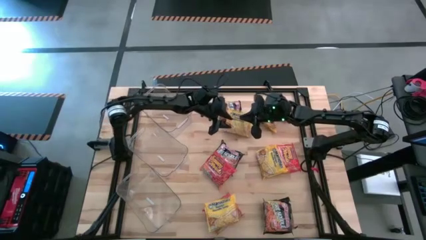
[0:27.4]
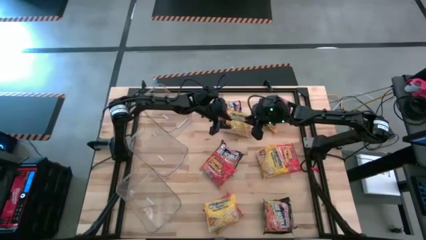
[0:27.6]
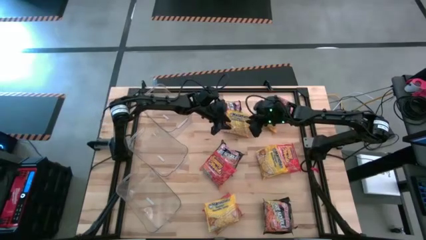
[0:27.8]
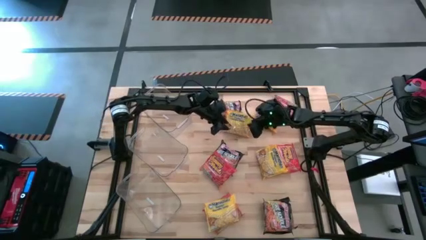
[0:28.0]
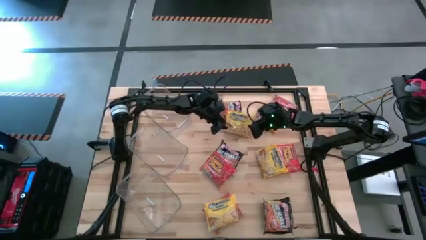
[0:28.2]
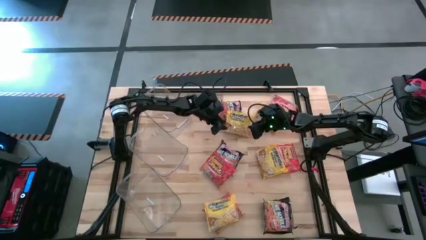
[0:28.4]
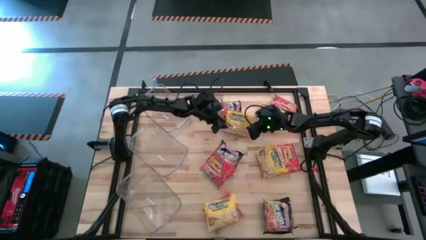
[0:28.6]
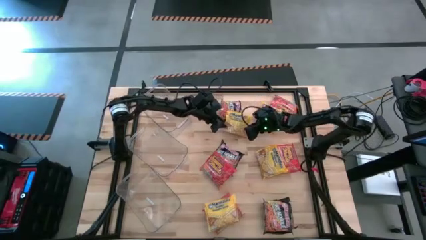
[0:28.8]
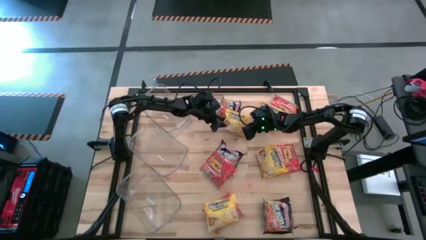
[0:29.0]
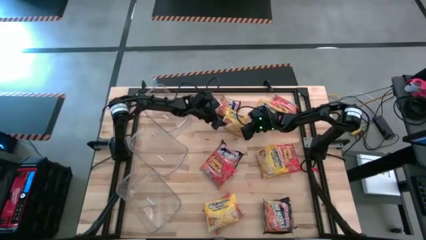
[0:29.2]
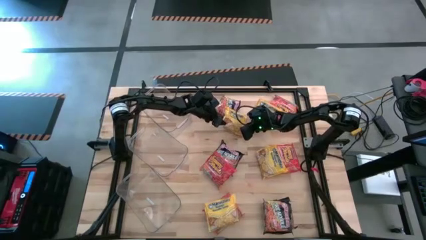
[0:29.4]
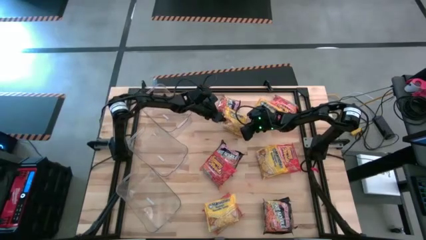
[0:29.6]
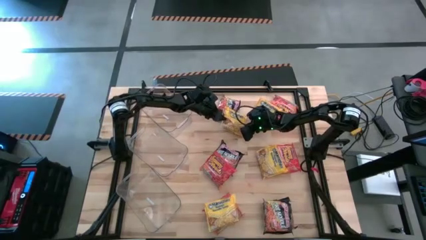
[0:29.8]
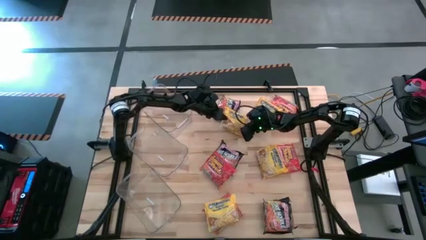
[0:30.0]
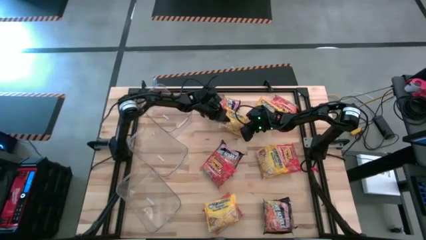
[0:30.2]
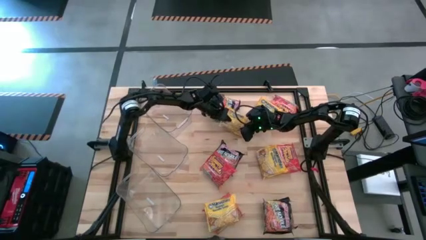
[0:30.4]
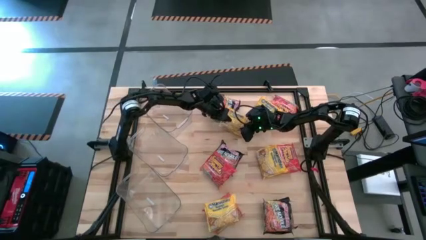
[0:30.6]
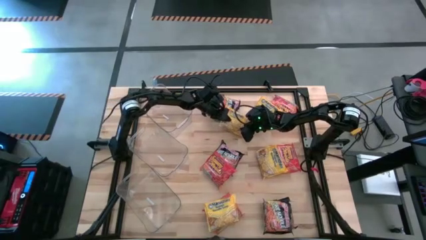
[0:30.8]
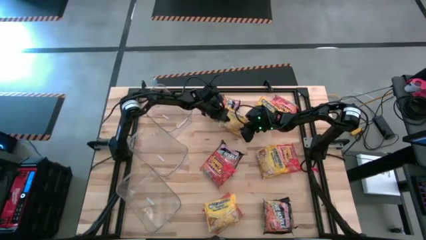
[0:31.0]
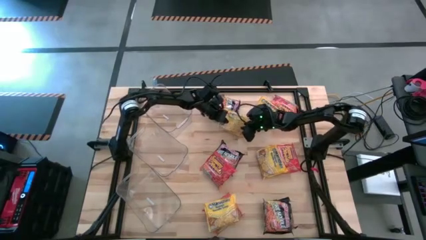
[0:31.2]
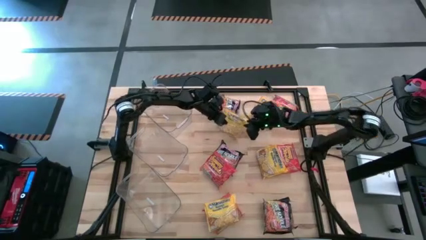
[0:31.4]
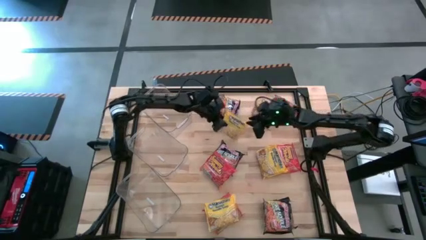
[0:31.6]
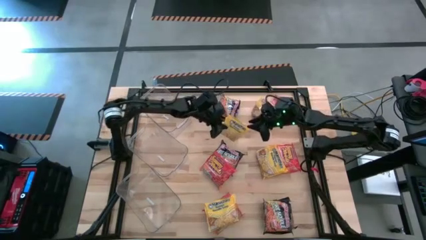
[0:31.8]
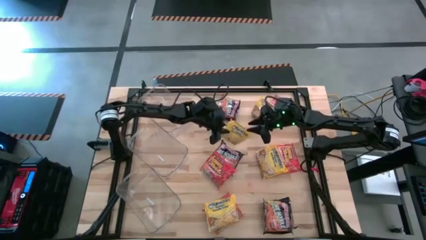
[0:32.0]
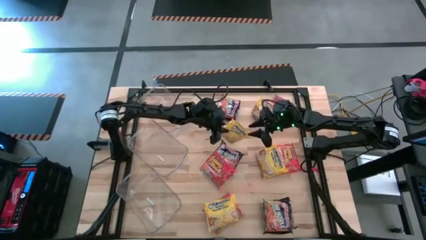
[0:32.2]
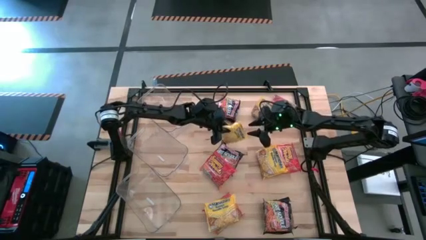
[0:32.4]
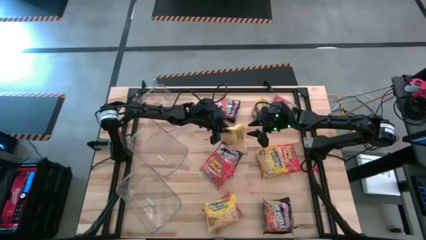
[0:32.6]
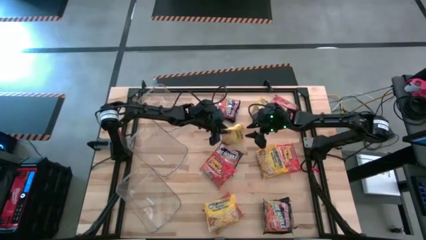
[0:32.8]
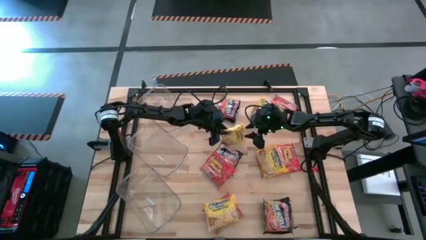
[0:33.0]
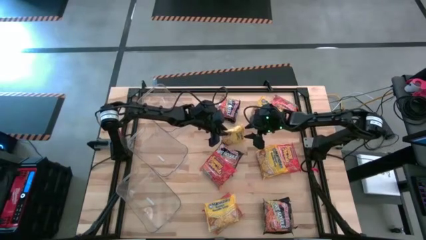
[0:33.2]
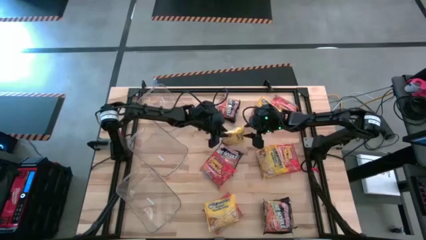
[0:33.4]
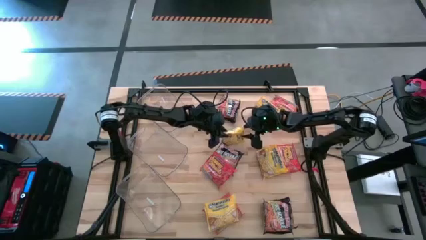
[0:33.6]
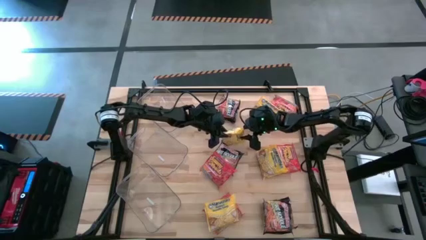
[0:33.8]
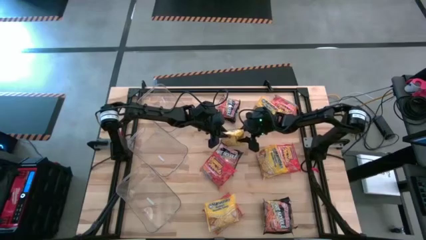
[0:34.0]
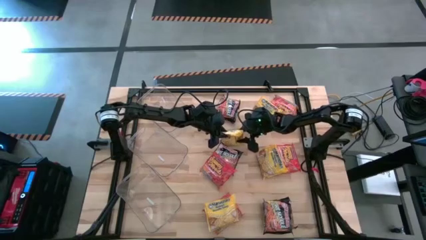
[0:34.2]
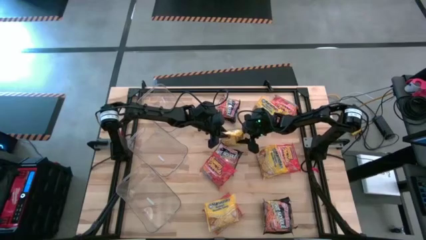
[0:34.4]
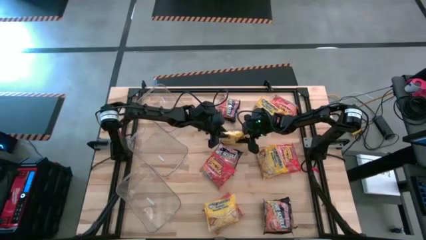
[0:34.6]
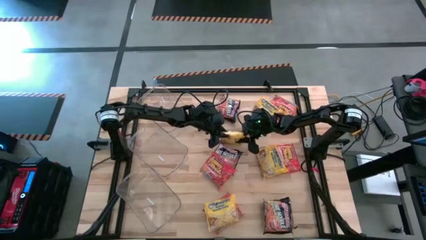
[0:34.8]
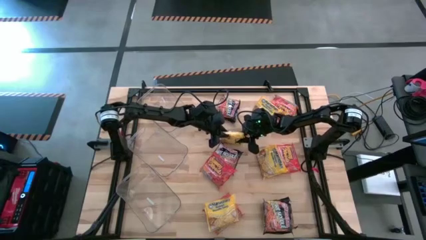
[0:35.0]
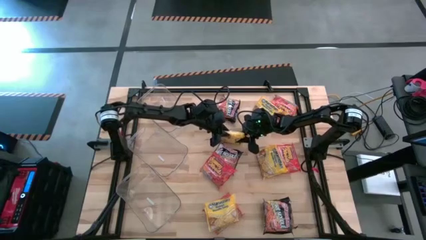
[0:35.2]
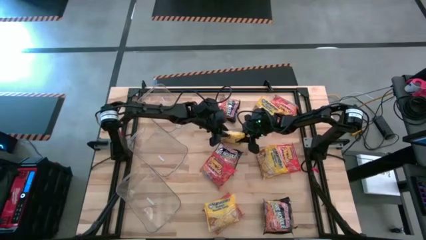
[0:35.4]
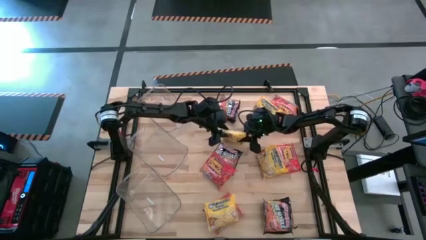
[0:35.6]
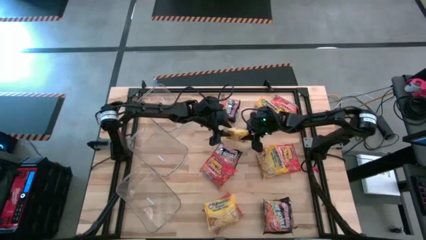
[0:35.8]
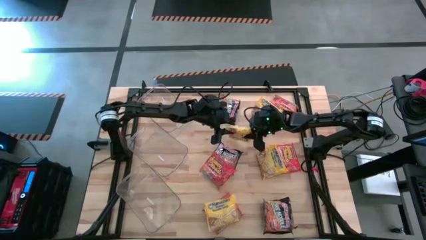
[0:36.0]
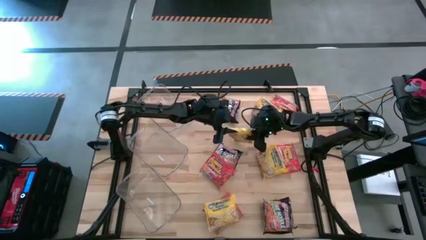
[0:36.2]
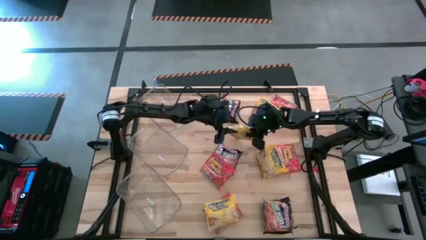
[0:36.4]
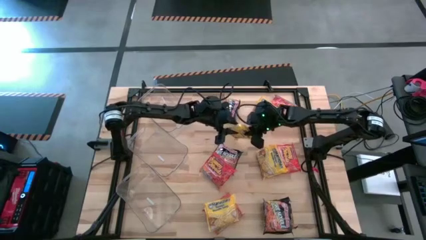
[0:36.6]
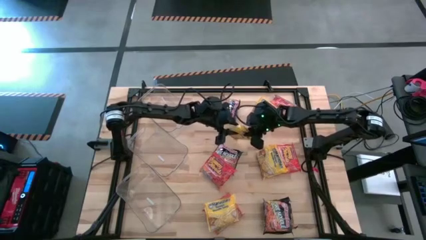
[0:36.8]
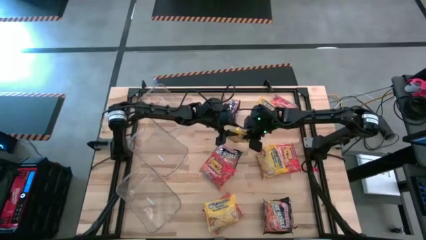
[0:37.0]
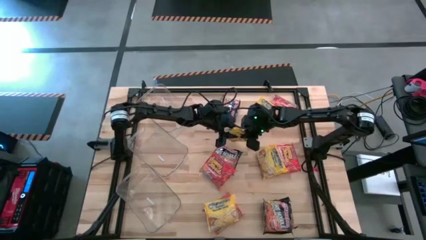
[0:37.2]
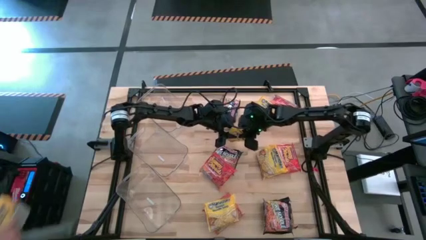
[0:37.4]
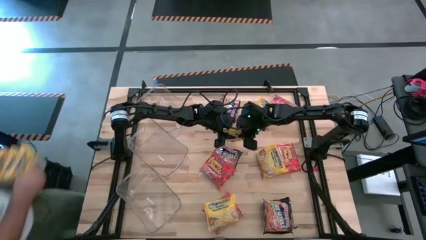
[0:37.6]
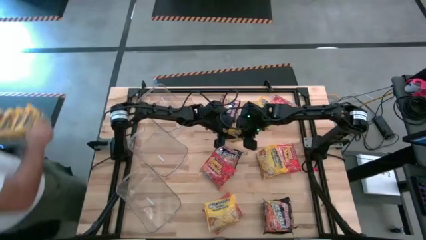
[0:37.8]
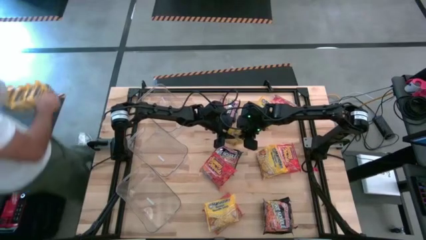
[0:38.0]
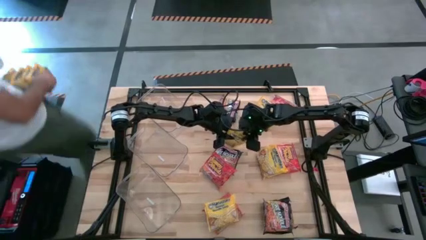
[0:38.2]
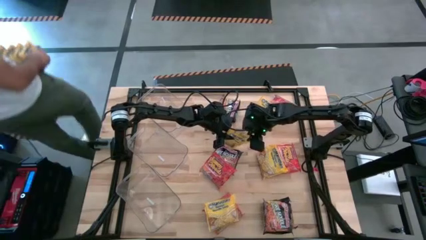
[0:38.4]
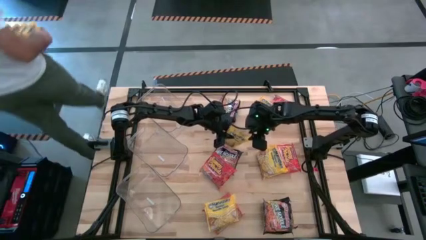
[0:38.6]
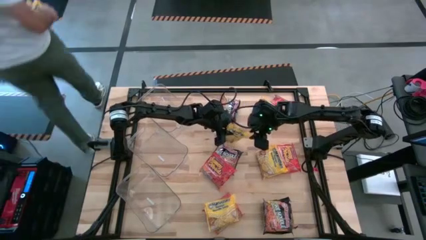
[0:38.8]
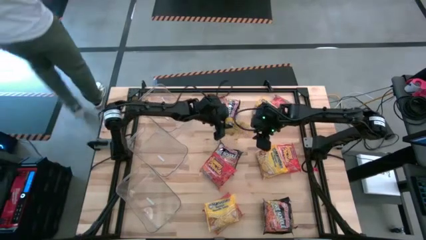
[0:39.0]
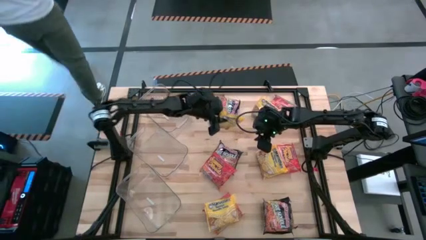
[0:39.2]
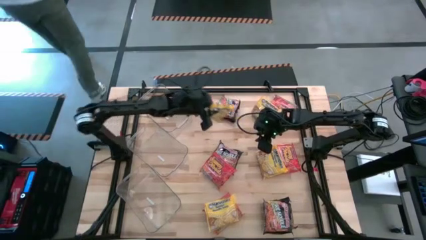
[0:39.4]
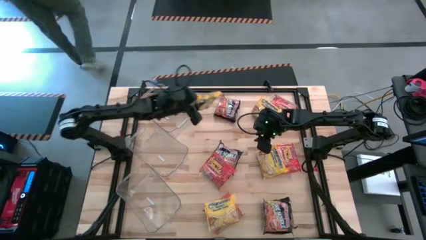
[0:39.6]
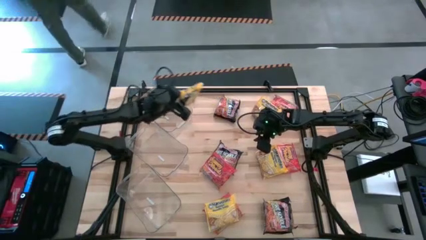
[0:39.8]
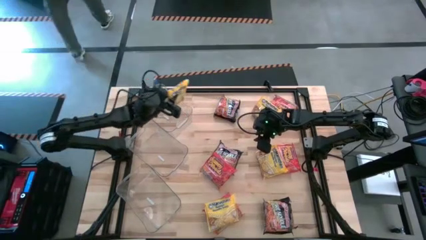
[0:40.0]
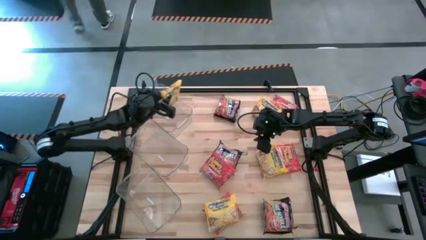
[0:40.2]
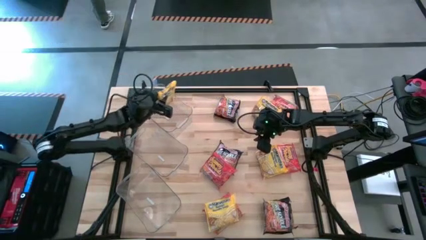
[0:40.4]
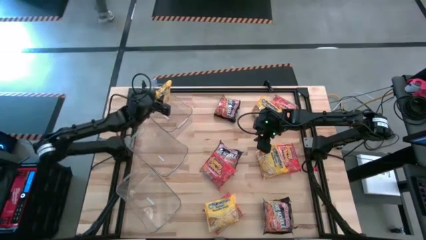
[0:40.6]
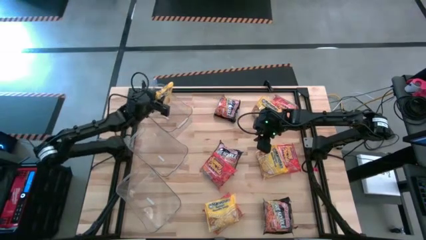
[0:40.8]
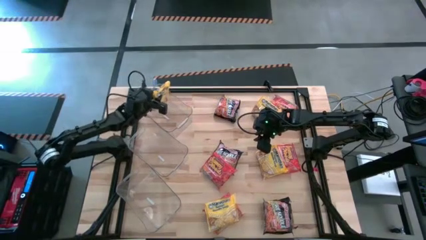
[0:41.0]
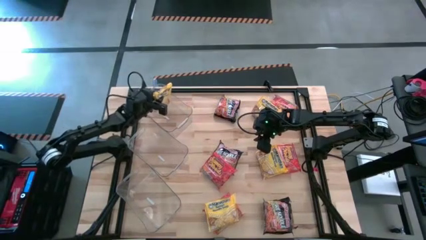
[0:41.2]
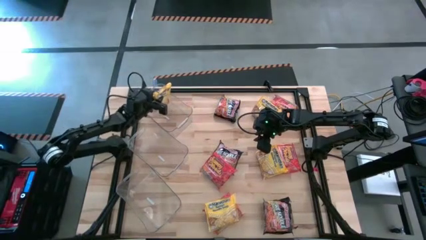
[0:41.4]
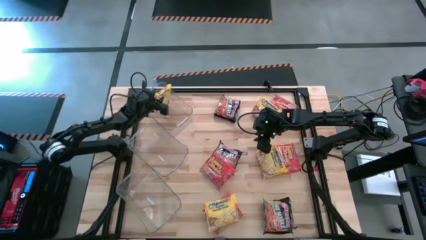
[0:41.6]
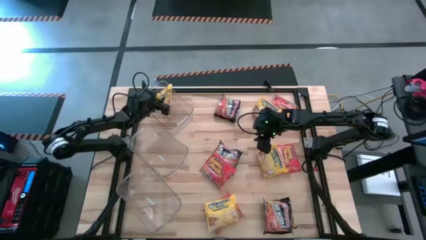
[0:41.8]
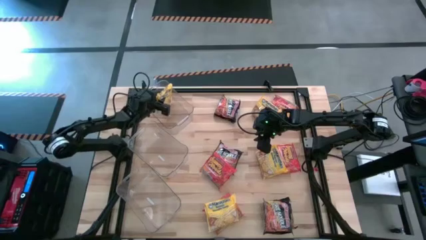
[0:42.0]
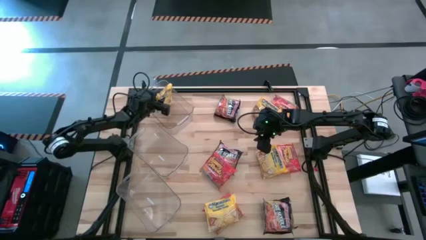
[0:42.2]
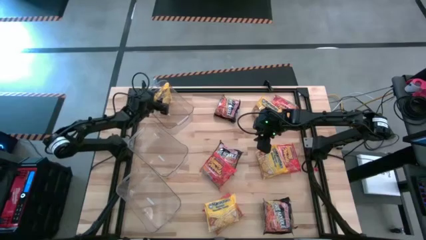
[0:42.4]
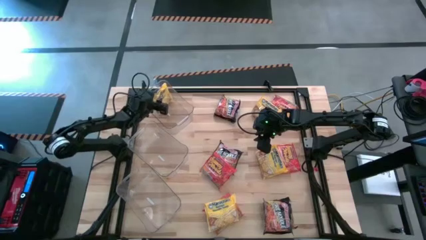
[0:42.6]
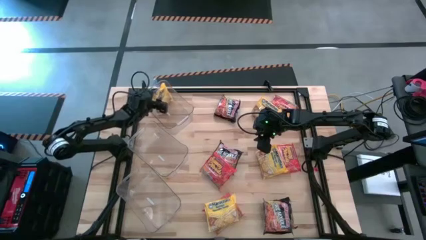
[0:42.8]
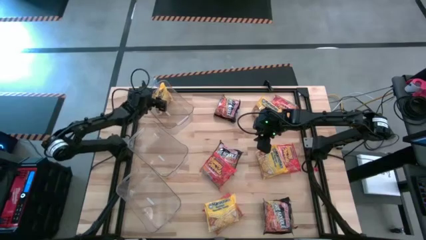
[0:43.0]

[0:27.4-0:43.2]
Task: Sort Maruchan noodles
Put the yellow noodles pack into the top transparent bin
